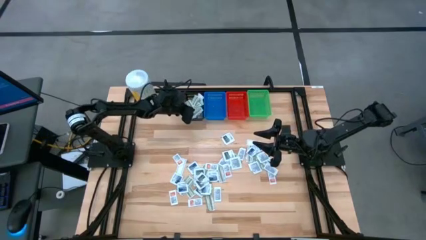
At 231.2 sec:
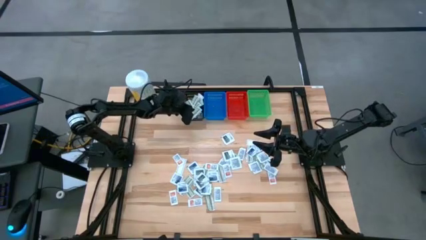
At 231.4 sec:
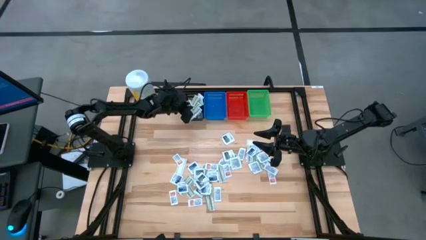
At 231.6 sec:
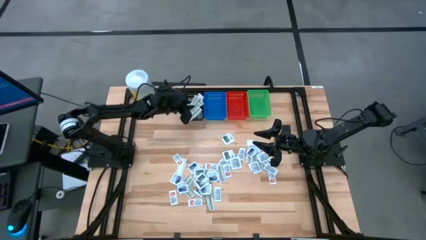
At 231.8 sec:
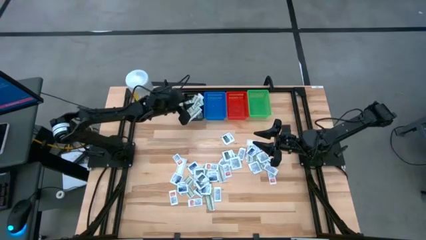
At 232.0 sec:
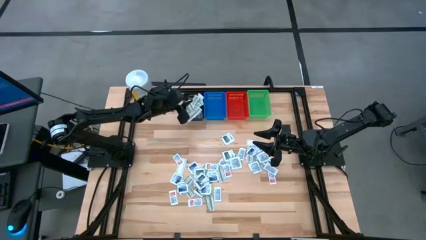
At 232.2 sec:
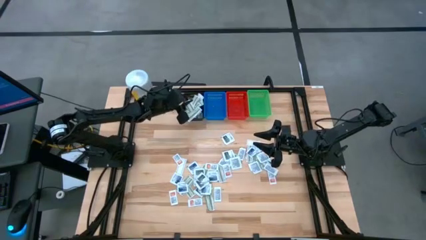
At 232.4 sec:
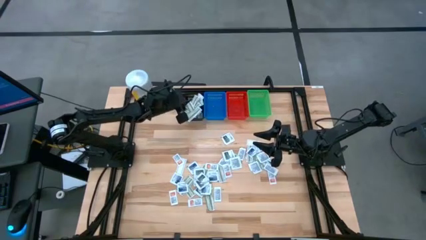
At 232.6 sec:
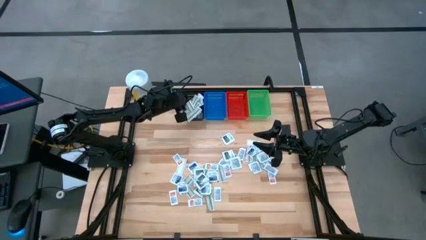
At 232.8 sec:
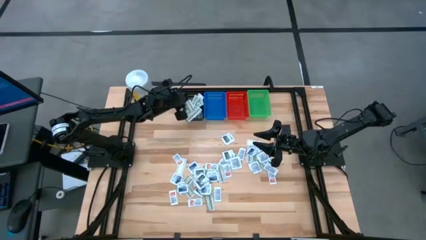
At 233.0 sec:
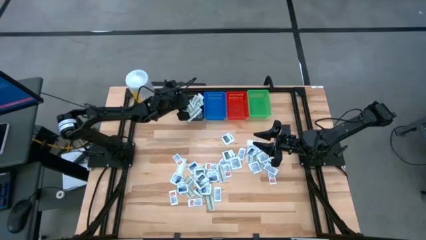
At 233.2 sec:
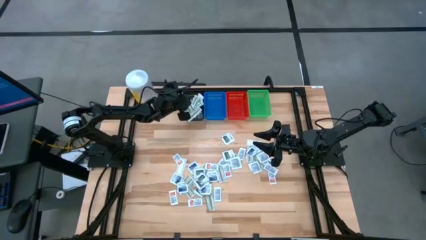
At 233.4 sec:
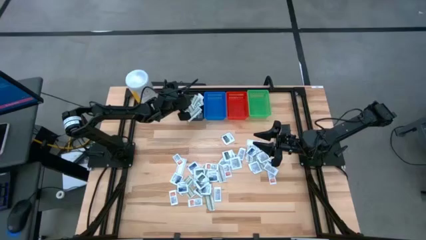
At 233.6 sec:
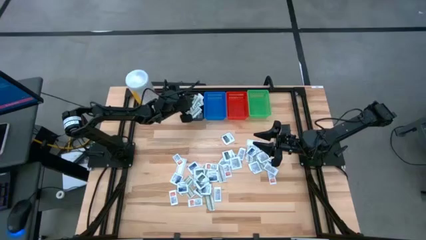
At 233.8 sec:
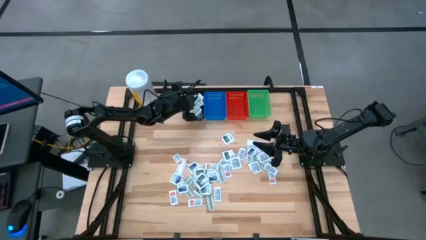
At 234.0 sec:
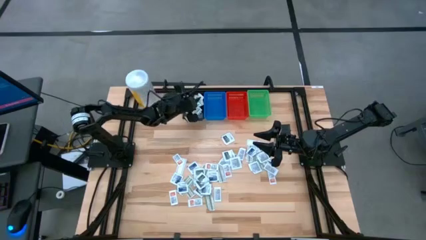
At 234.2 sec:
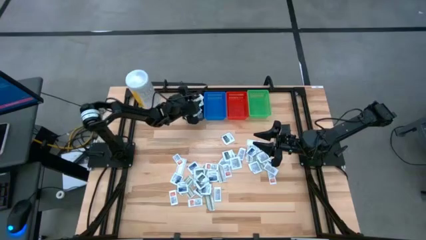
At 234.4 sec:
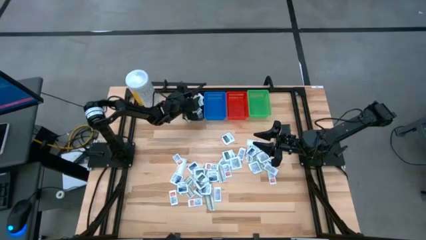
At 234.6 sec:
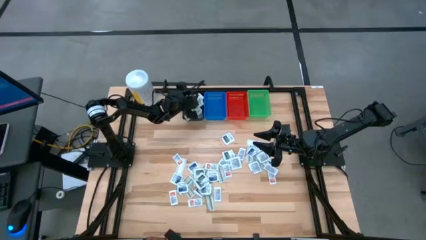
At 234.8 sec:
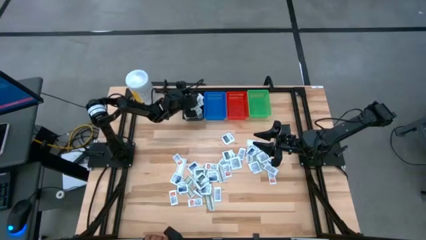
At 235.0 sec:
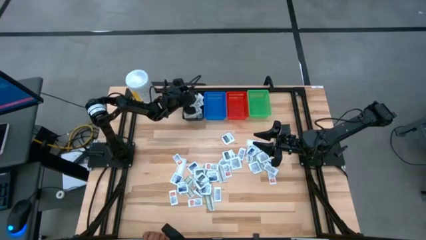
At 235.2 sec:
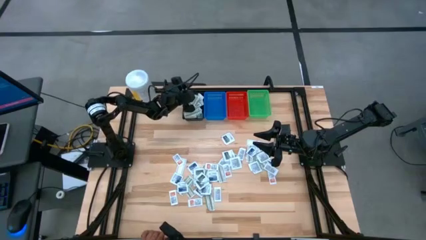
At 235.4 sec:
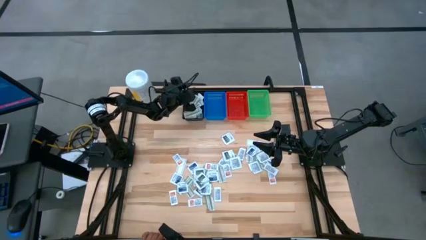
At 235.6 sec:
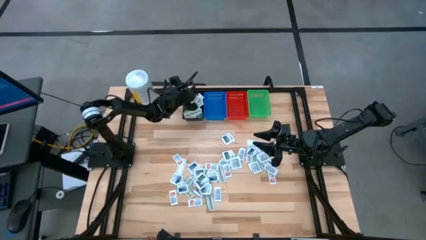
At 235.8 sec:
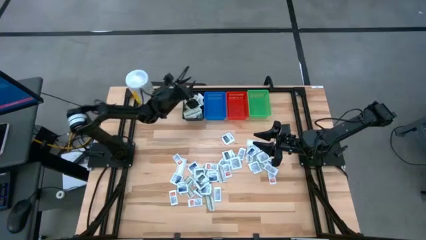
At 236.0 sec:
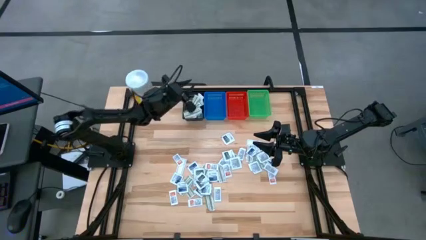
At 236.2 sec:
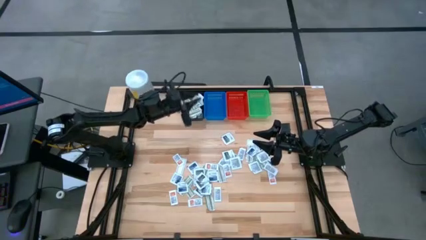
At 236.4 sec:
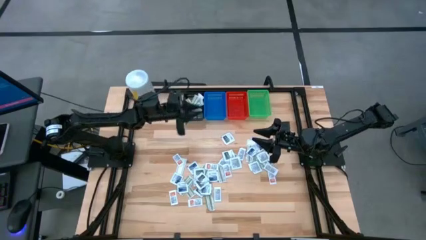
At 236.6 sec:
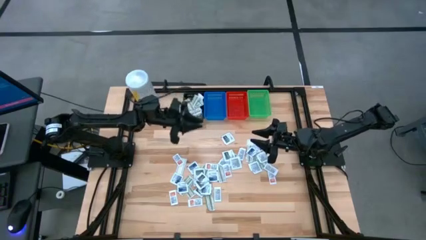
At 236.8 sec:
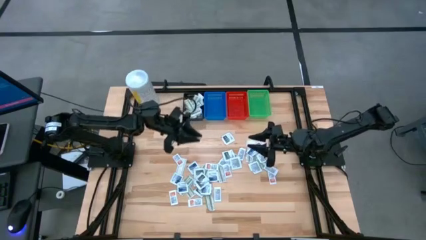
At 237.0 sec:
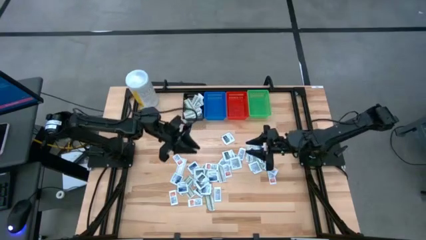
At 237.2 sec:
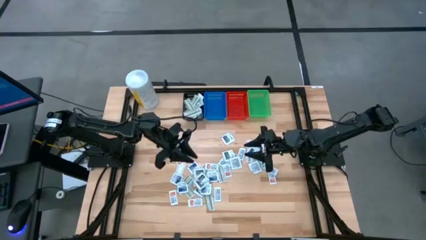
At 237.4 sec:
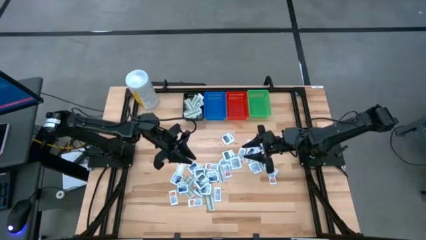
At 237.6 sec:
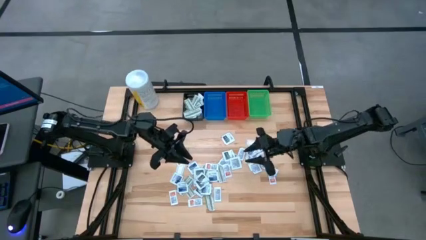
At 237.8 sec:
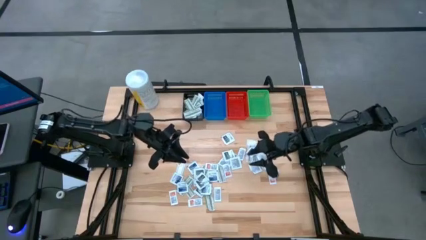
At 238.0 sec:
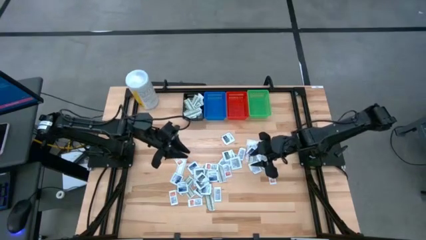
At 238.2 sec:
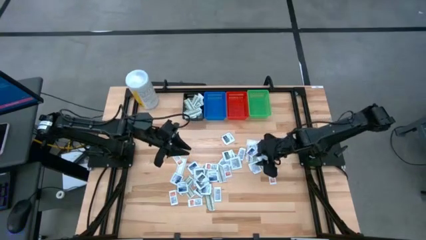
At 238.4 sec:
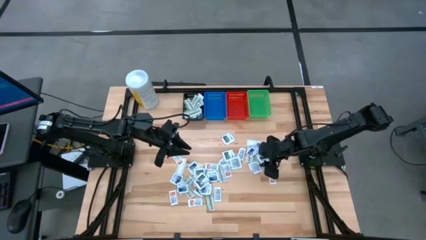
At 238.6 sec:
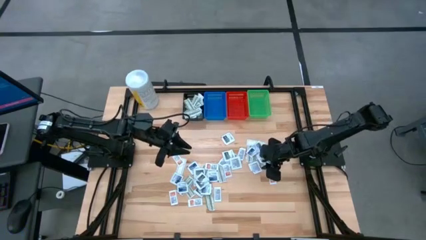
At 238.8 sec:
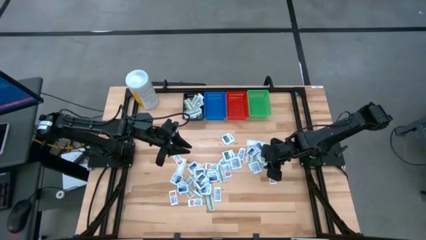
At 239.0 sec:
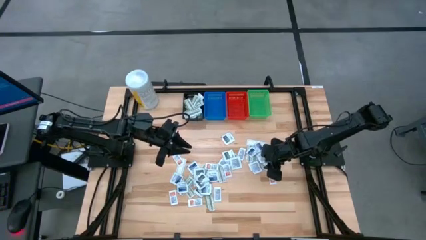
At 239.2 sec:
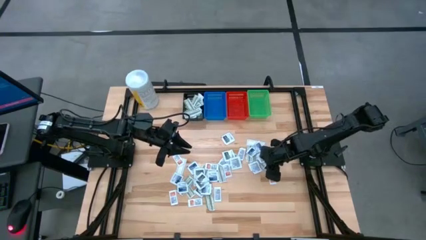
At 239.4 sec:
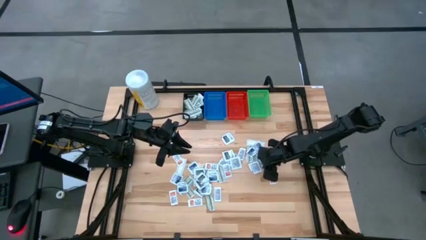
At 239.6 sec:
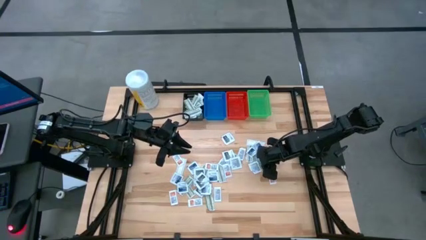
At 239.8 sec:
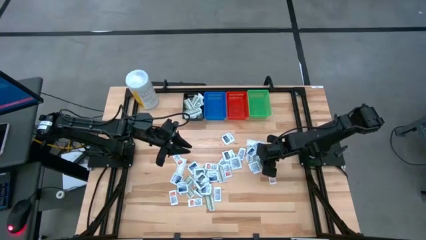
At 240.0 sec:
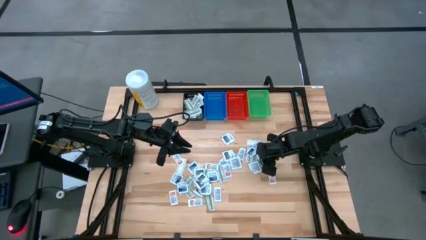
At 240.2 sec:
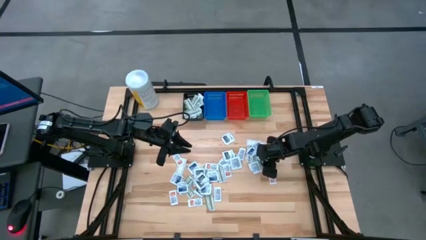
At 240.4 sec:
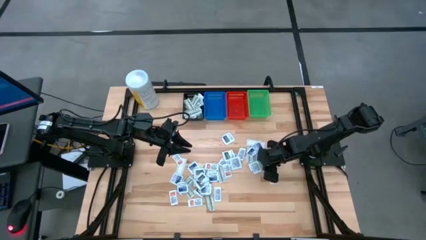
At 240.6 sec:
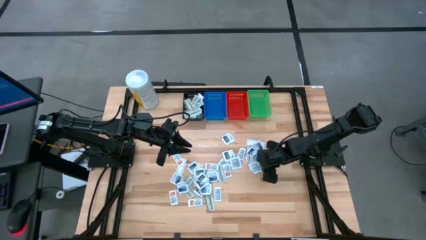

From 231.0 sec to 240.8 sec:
Task: Pick & Place First Aid Supplies
Put the green bandage pack in the black bin
